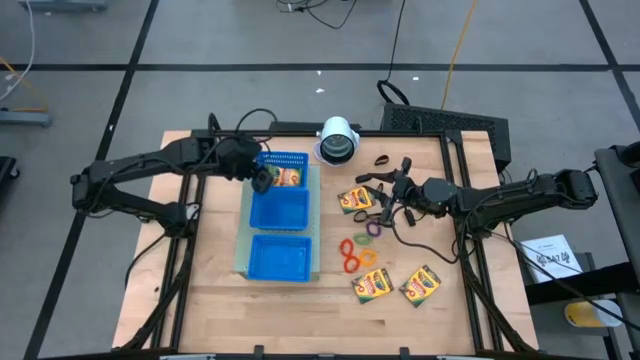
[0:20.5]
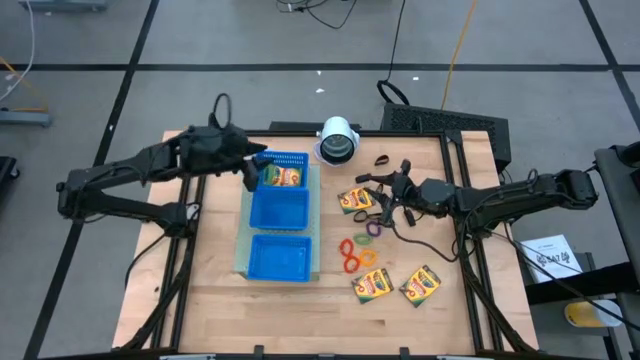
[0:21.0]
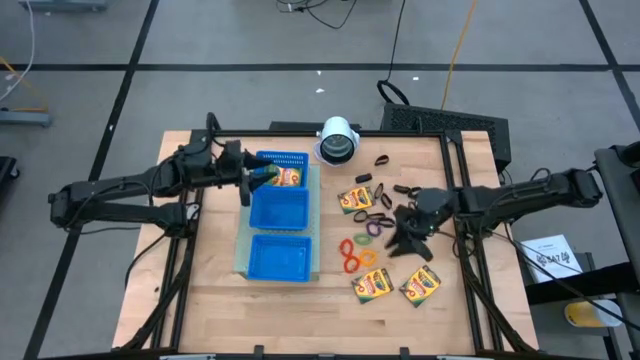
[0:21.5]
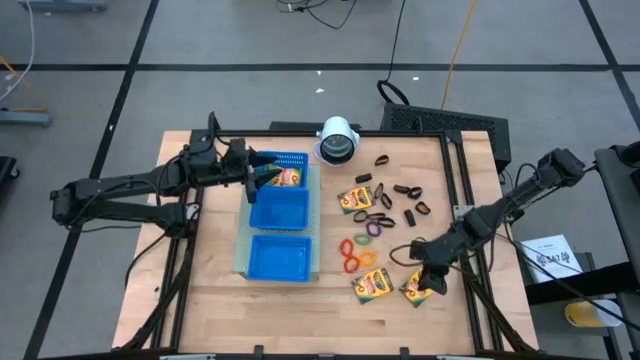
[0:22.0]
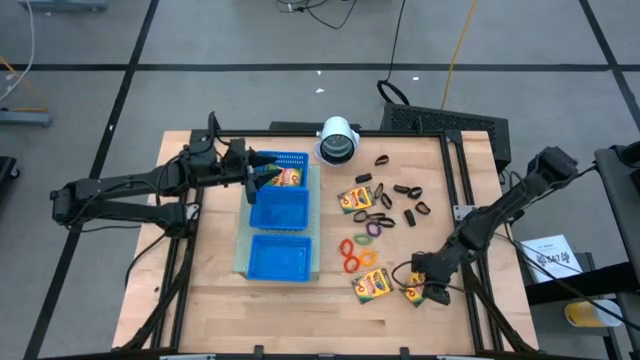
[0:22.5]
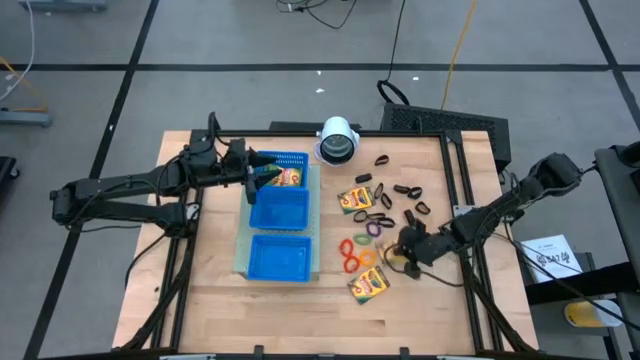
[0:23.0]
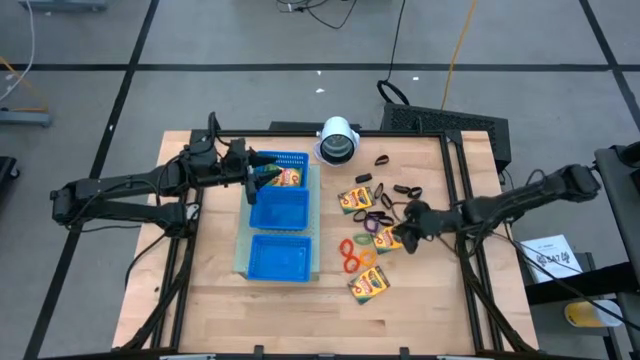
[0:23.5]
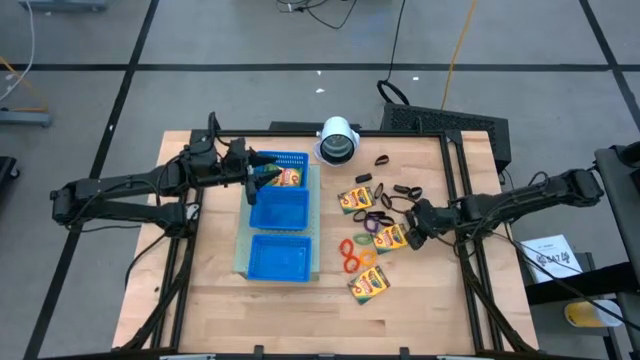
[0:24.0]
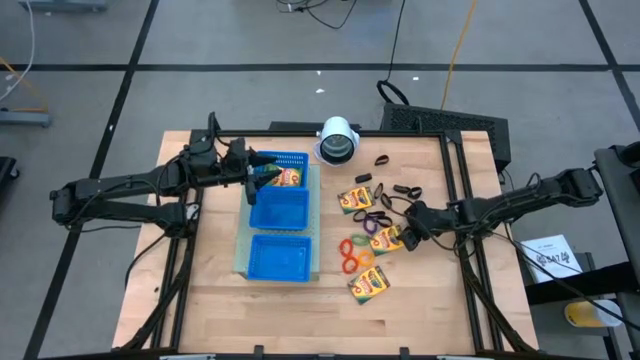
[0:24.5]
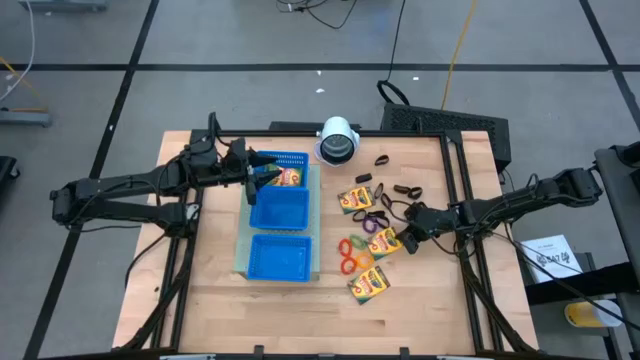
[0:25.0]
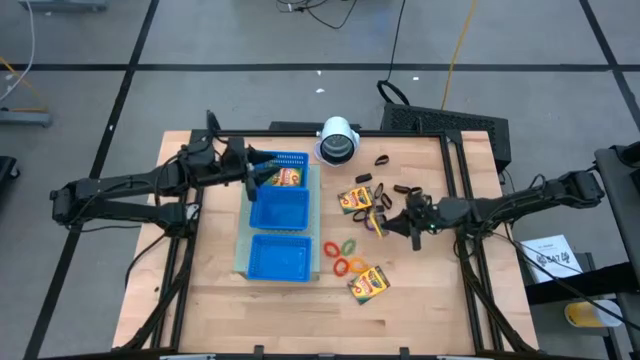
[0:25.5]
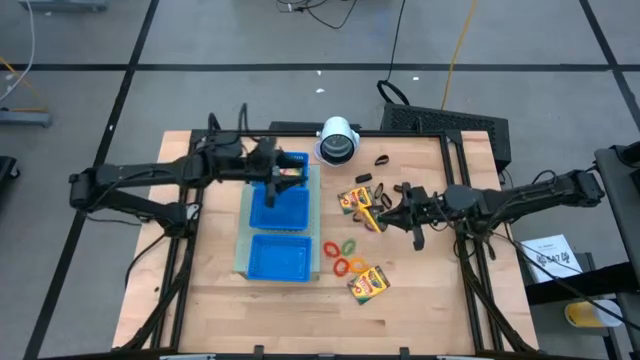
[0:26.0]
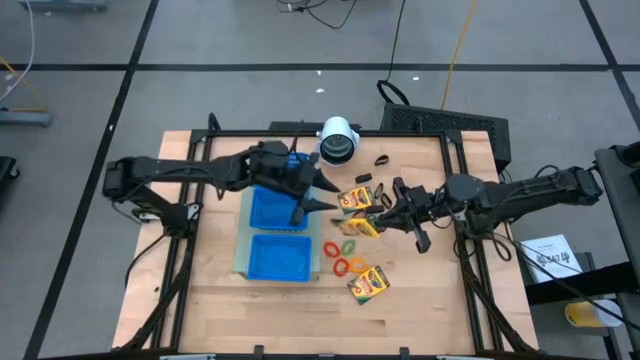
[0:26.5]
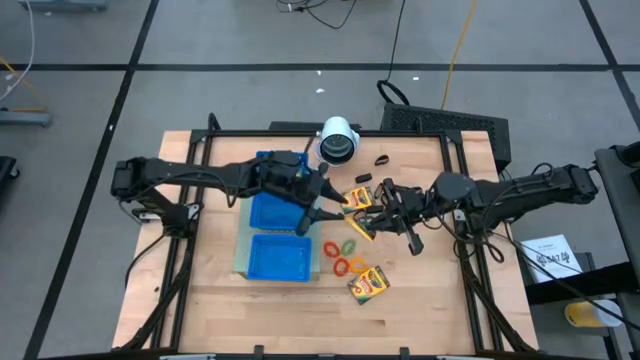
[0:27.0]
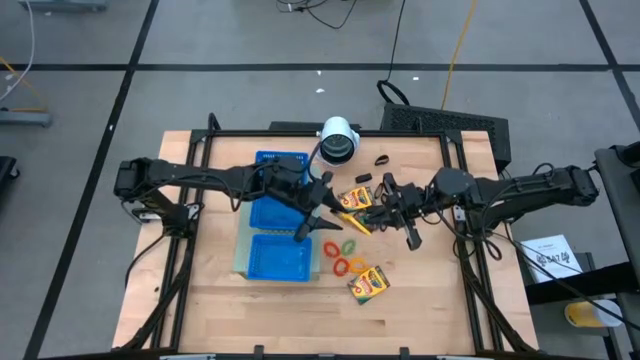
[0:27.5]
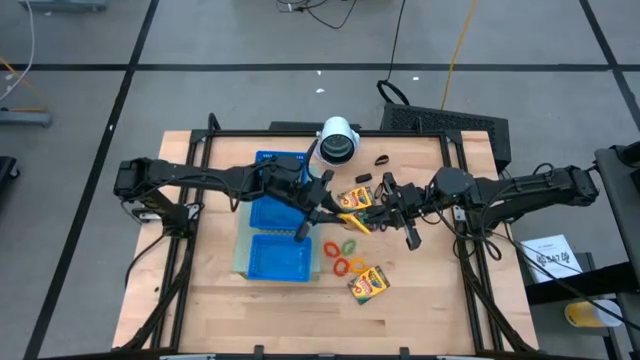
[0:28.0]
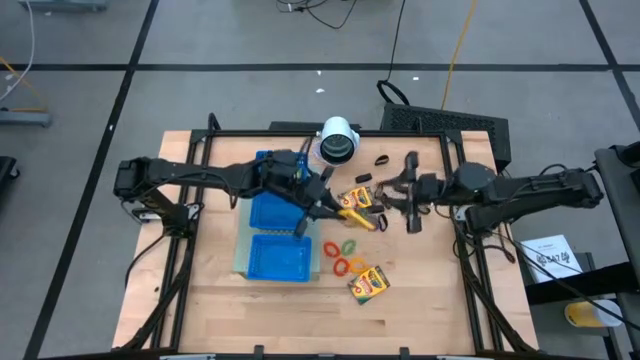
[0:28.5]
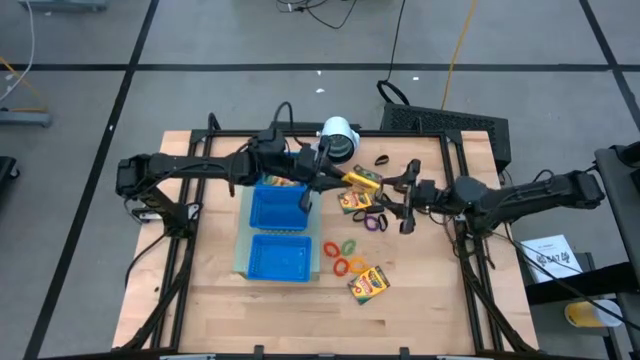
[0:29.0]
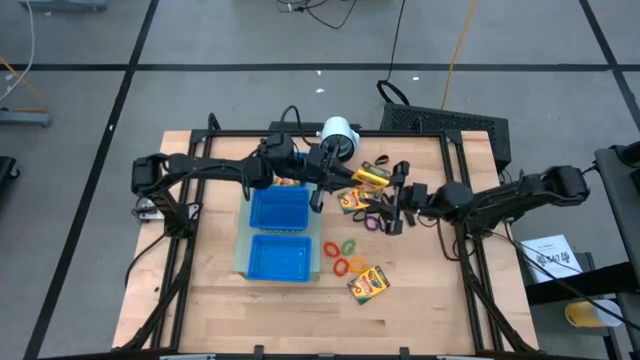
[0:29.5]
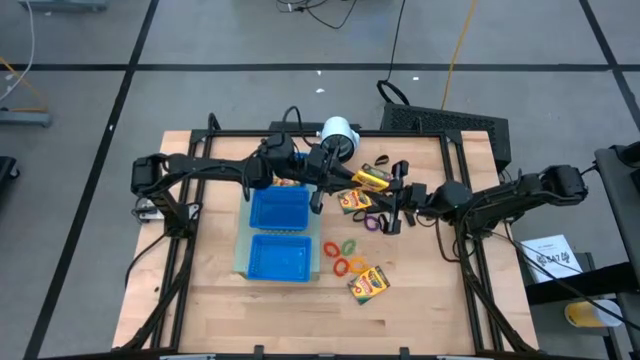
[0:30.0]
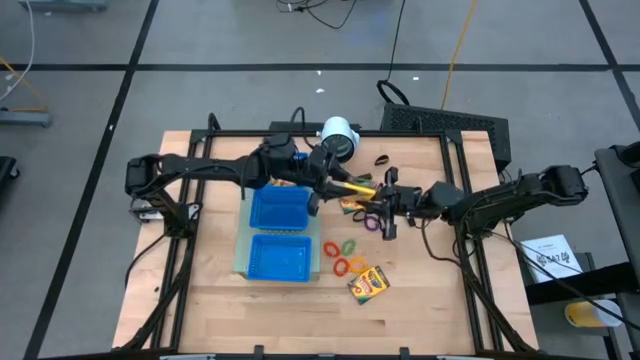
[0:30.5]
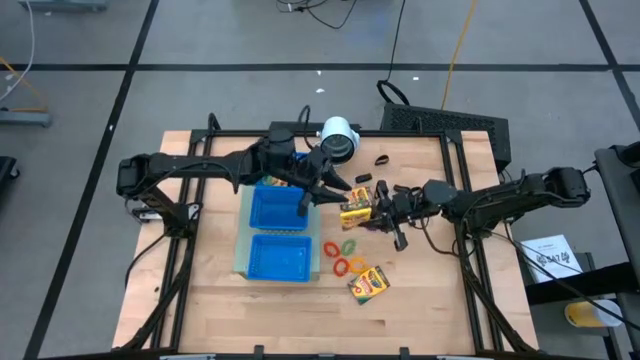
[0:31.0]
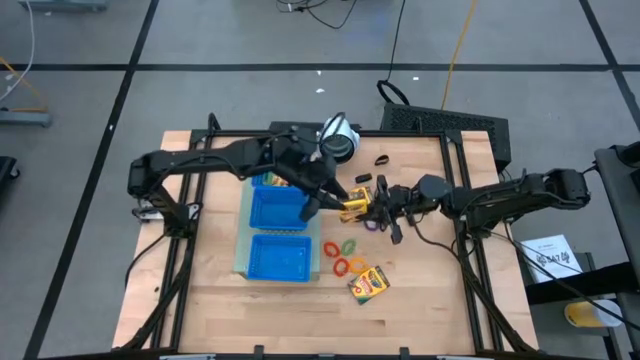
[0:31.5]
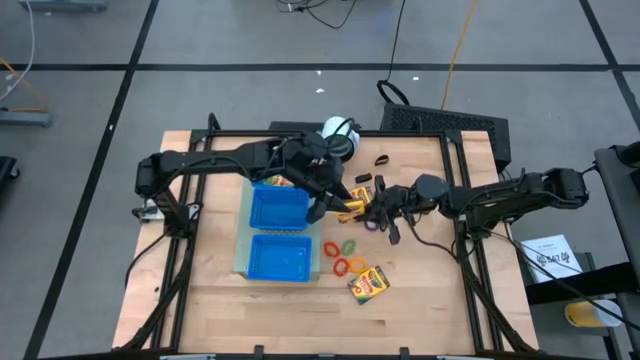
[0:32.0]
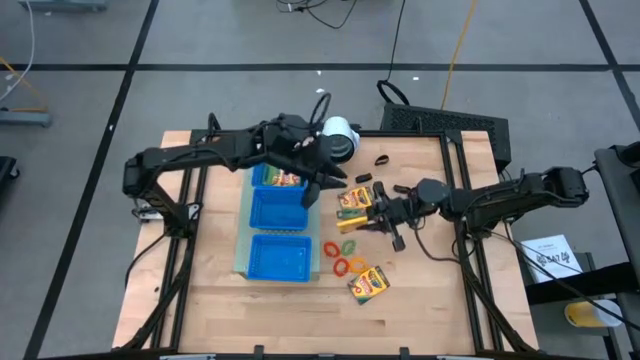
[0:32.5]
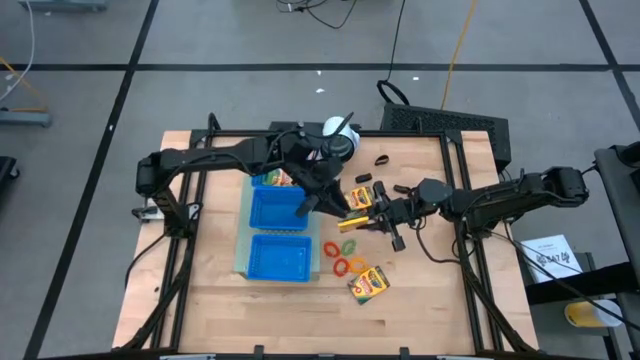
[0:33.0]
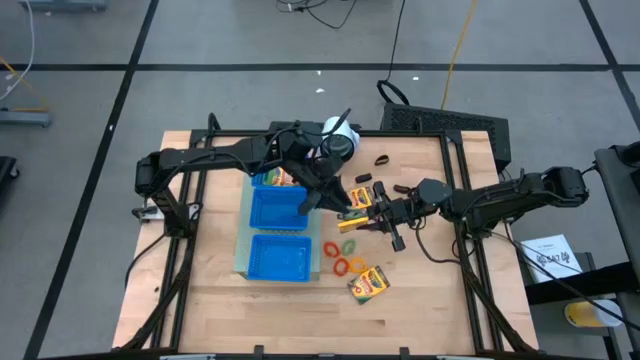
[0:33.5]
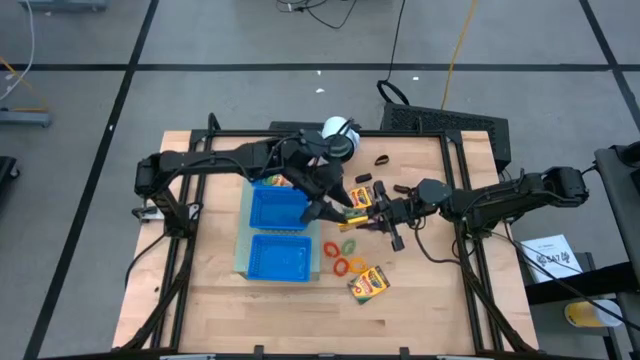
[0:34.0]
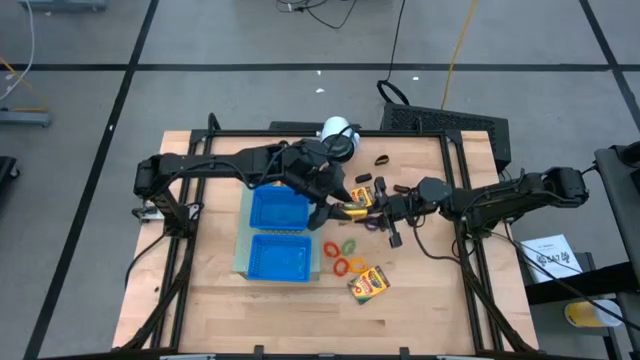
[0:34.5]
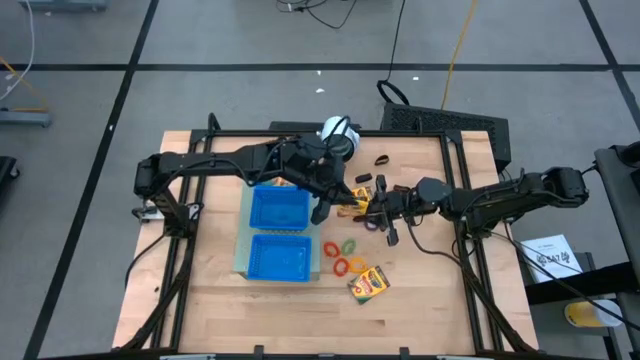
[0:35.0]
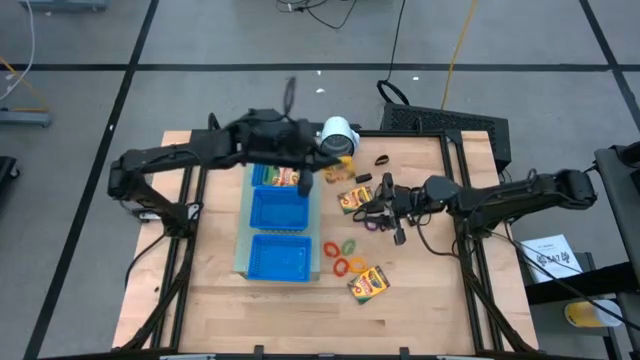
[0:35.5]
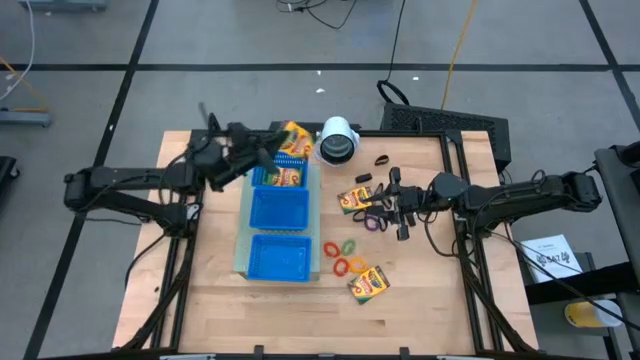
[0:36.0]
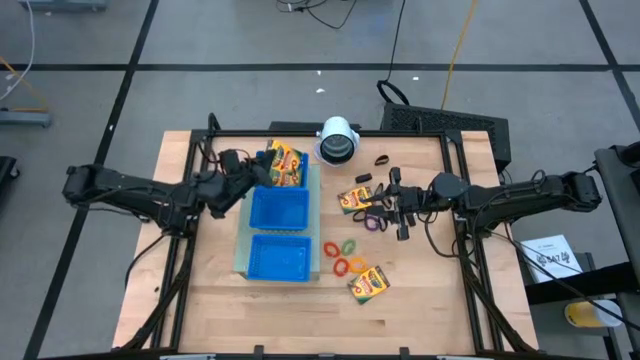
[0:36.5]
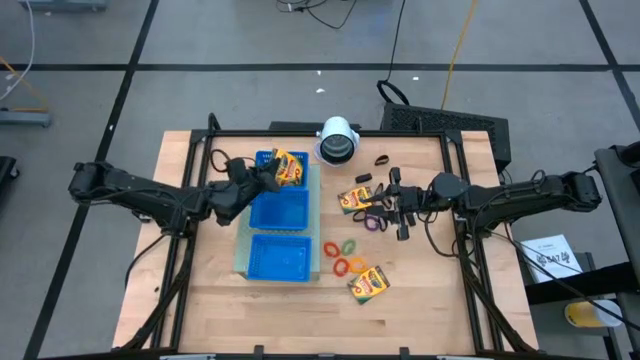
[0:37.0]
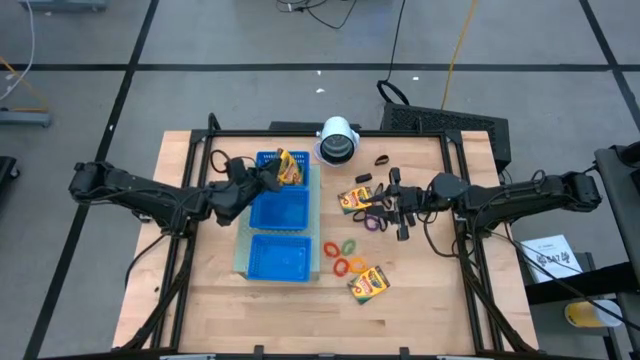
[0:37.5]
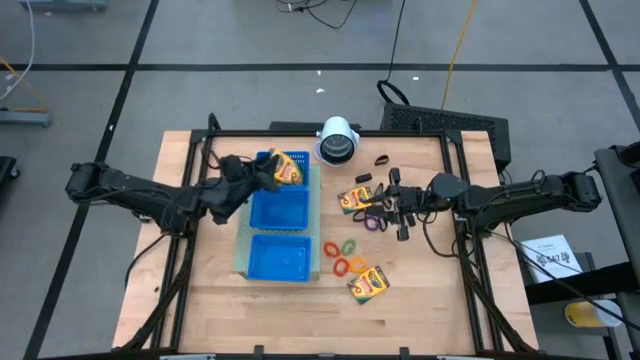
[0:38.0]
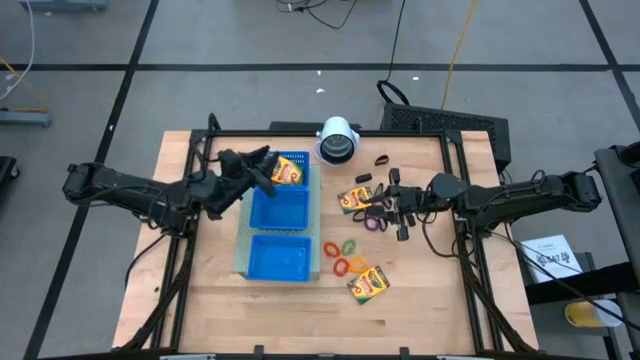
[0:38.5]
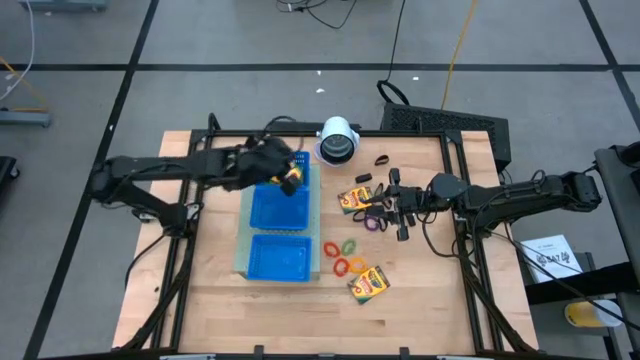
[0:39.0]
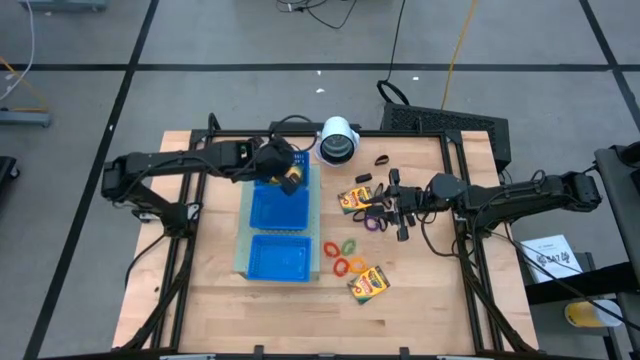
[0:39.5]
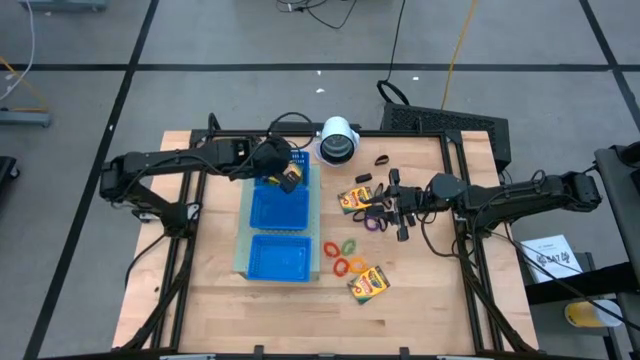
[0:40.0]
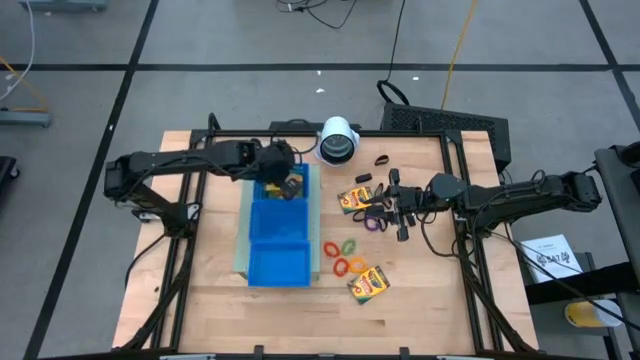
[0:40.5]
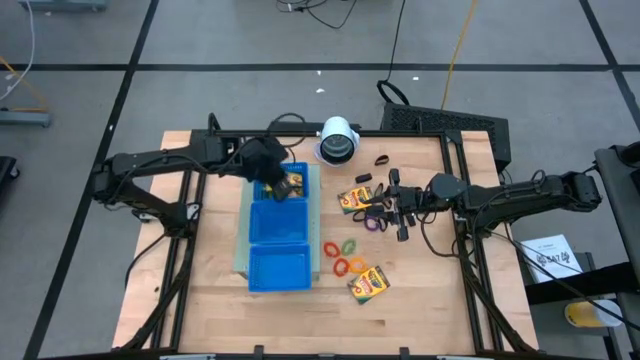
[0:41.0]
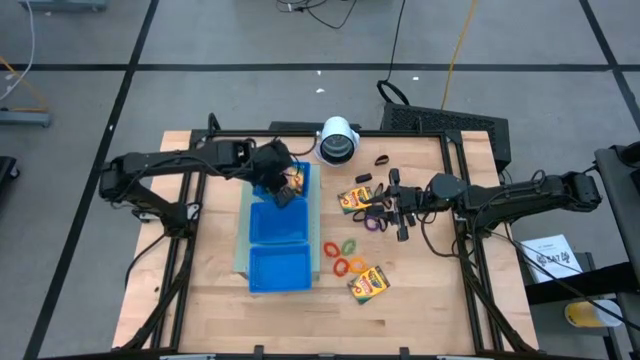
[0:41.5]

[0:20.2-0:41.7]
Task: Pick & Place Office Desk Supplies
Put the crayon box into the top blue bin on the shelf
